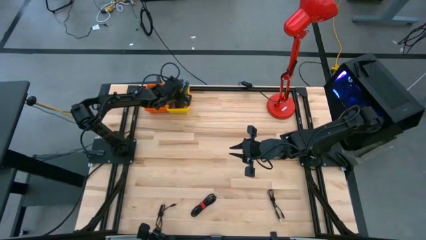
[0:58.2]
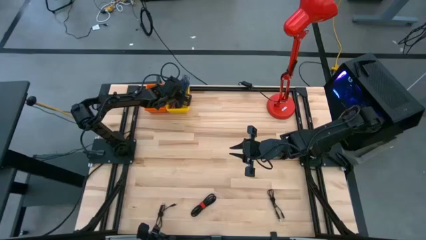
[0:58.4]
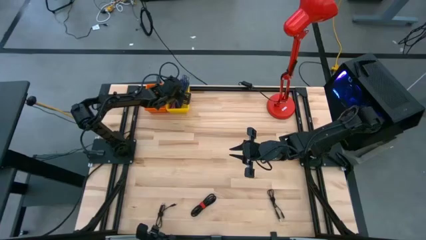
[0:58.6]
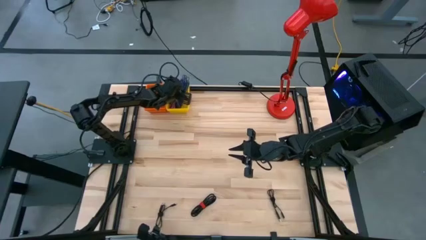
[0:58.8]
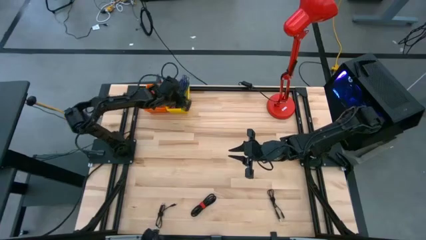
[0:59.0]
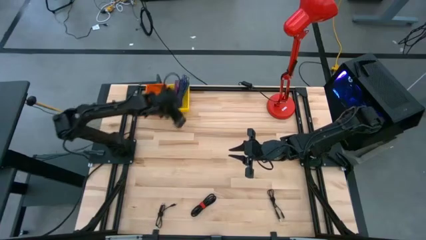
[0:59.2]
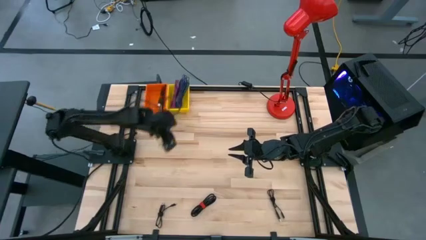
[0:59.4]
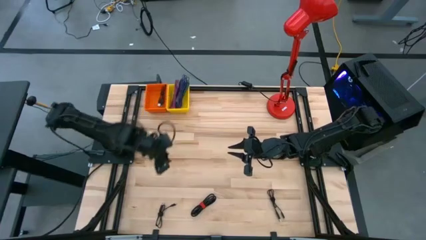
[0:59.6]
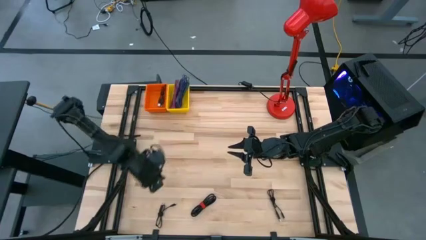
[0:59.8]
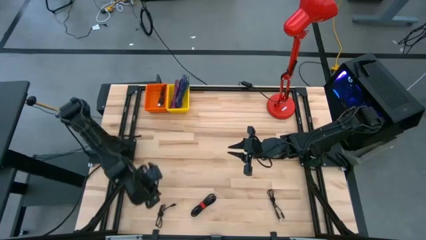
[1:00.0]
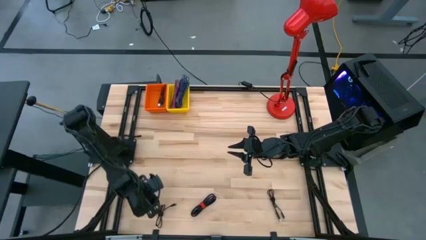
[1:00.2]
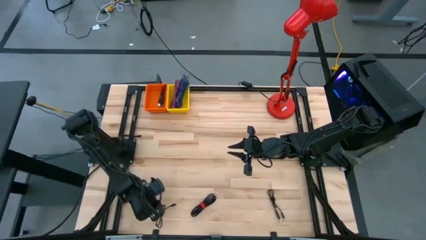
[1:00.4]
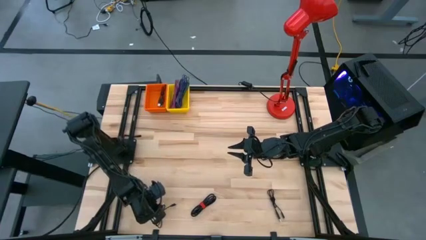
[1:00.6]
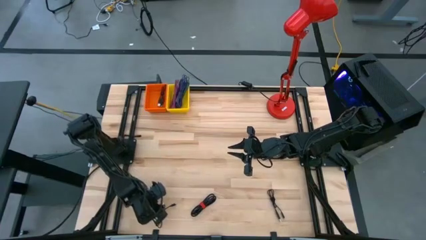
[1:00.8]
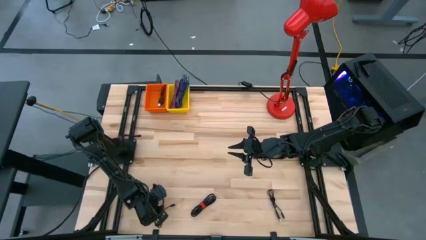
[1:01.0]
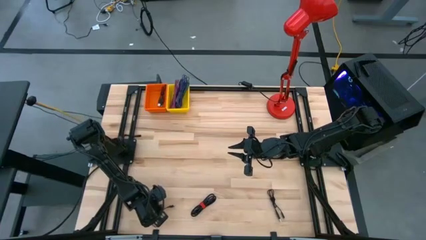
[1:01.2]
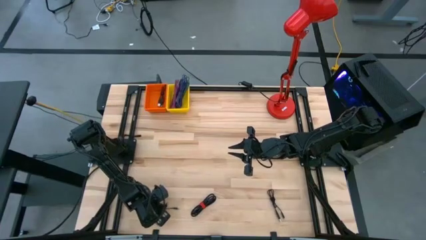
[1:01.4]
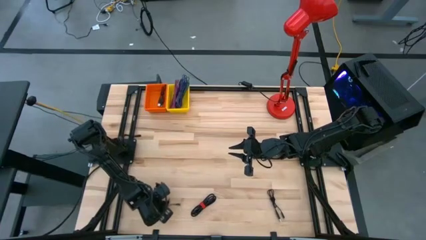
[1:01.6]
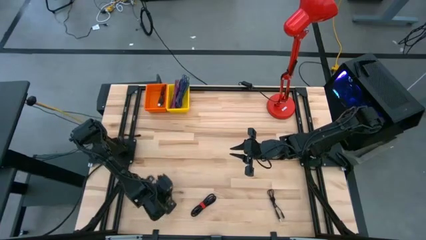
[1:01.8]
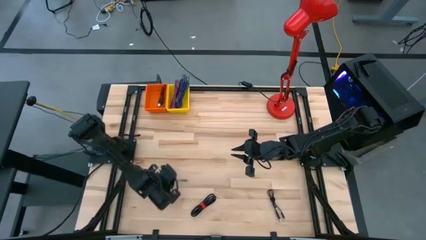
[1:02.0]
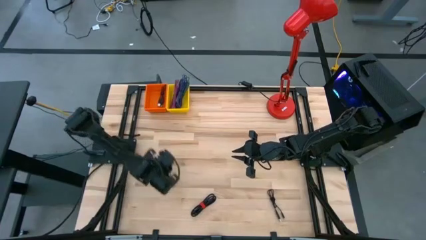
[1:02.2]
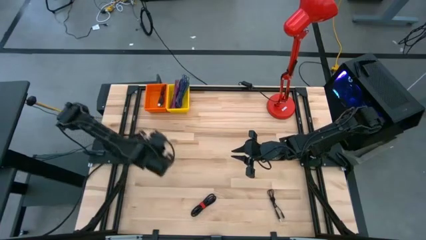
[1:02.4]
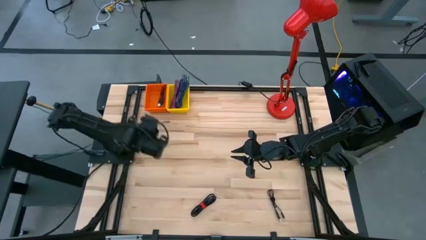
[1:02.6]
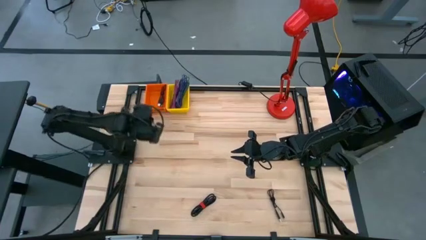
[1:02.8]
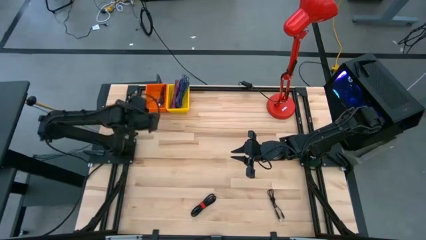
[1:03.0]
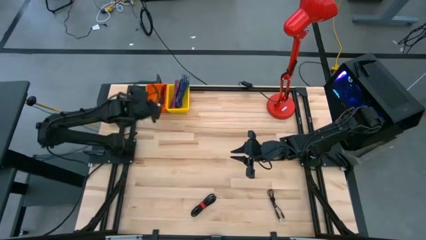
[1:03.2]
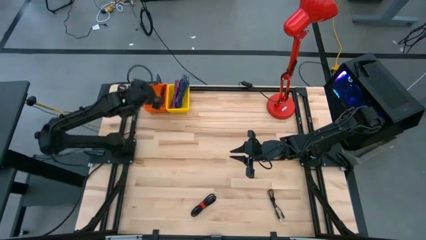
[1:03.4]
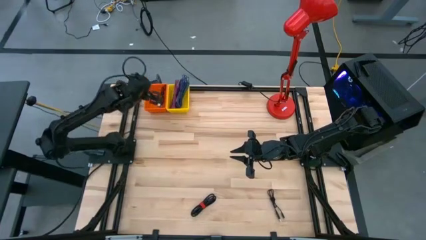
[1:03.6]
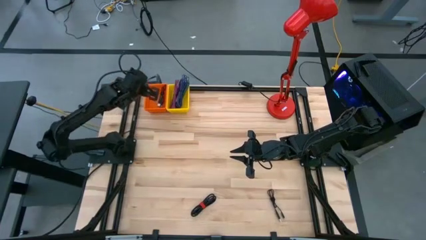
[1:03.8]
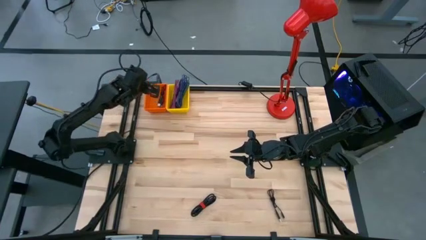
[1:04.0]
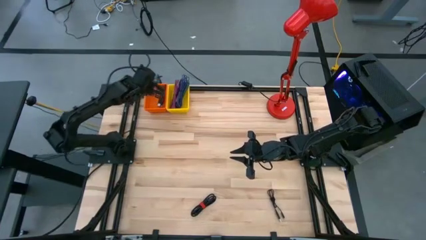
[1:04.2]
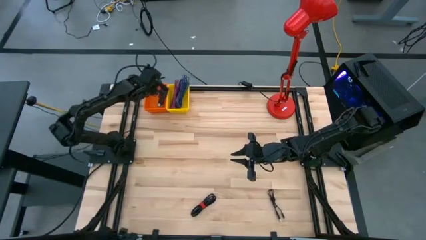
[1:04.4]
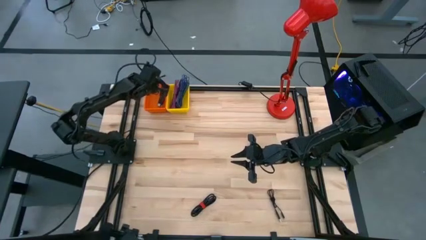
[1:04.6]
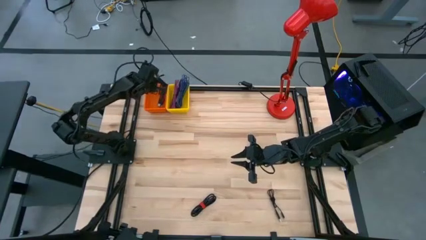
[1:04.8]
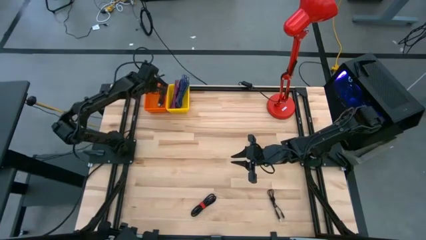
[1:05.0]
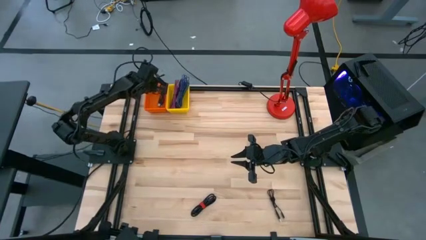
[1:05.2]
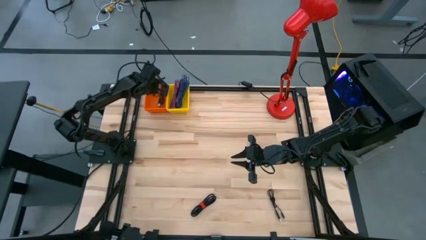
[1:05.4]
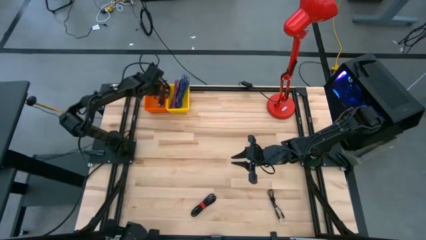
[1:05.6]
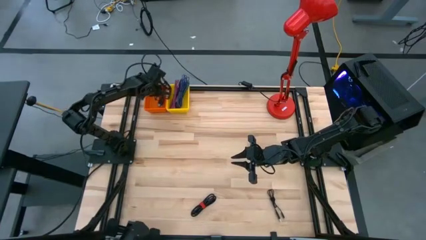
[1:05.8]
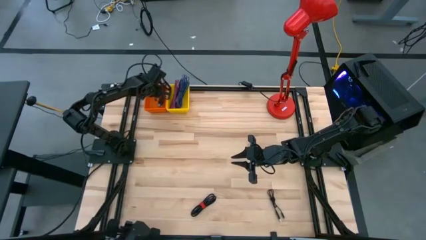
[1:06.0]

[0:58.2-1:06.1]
Task: Pick & Place USB Port
Put the black USB cable into the orange bin

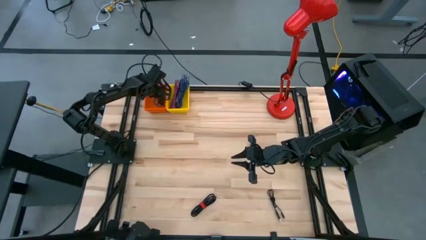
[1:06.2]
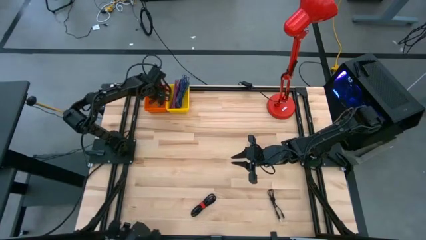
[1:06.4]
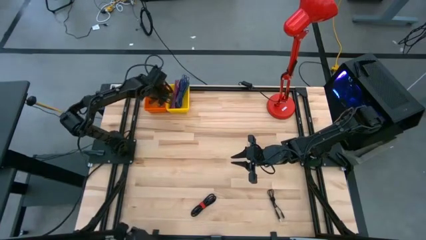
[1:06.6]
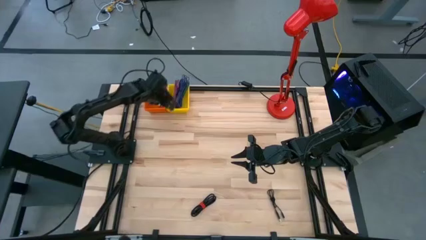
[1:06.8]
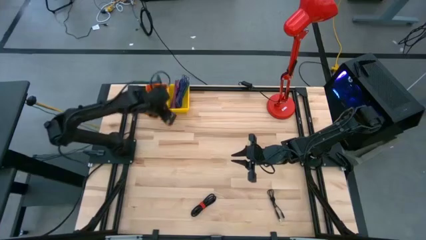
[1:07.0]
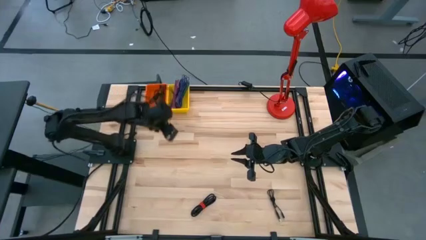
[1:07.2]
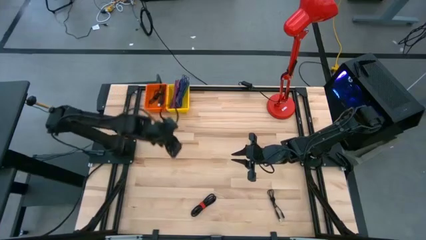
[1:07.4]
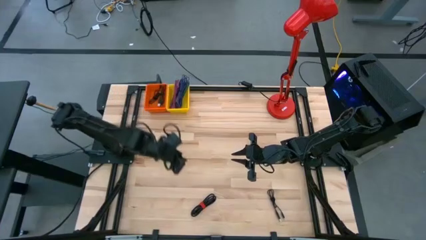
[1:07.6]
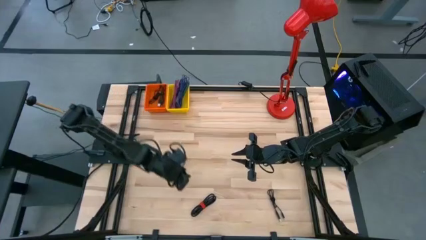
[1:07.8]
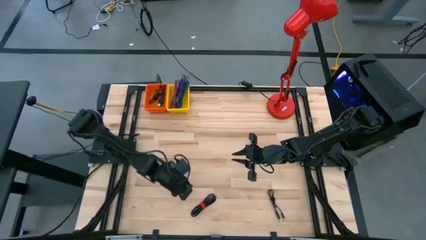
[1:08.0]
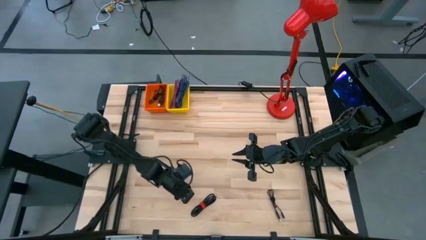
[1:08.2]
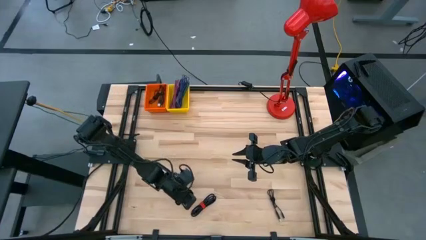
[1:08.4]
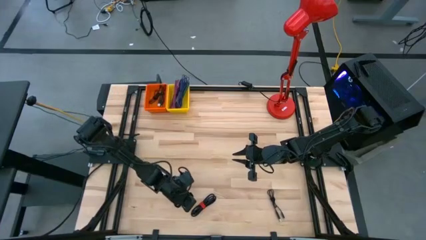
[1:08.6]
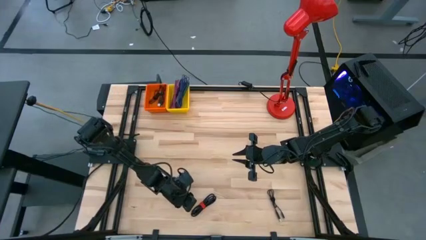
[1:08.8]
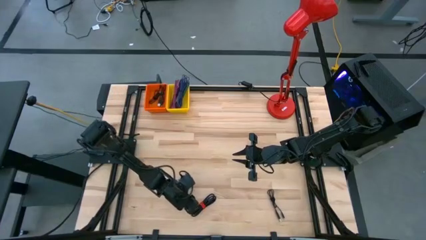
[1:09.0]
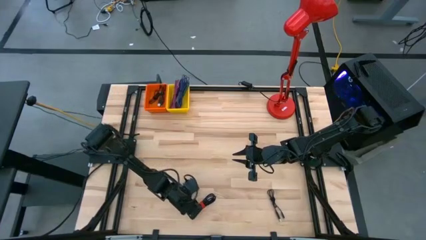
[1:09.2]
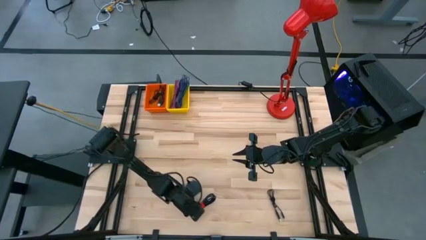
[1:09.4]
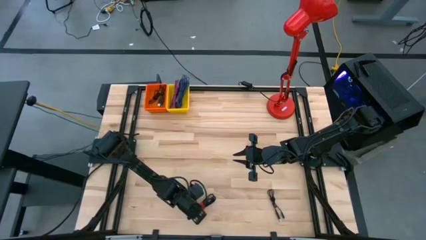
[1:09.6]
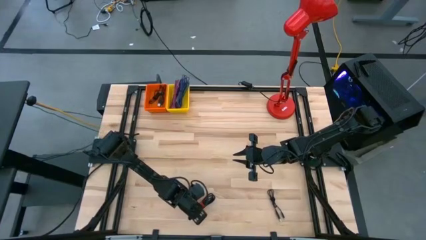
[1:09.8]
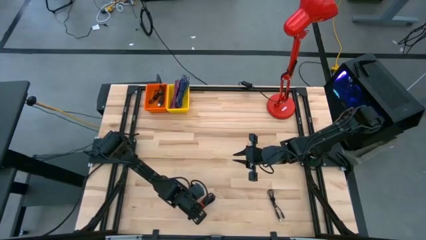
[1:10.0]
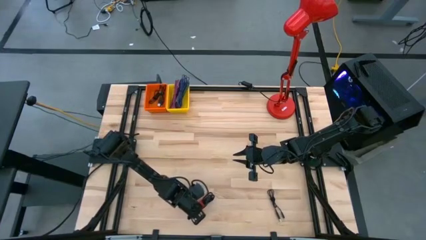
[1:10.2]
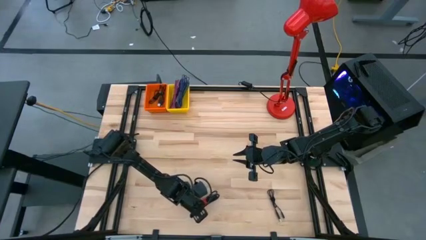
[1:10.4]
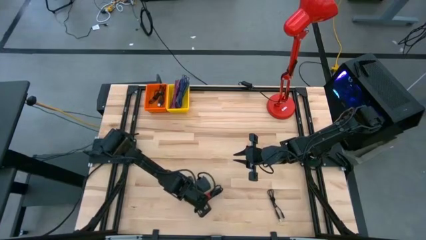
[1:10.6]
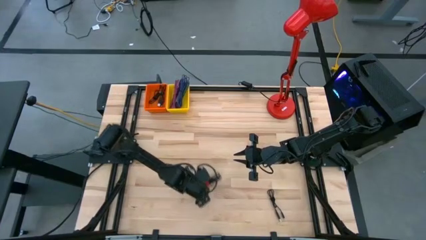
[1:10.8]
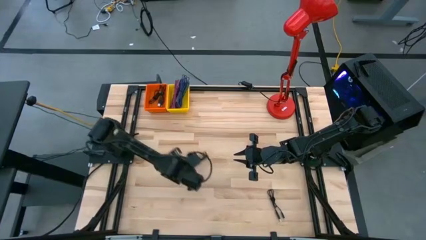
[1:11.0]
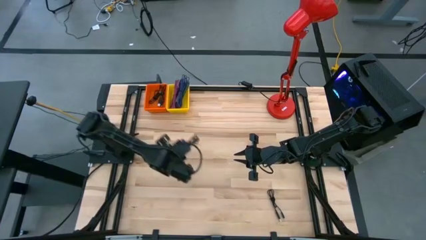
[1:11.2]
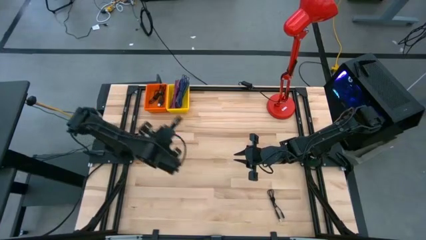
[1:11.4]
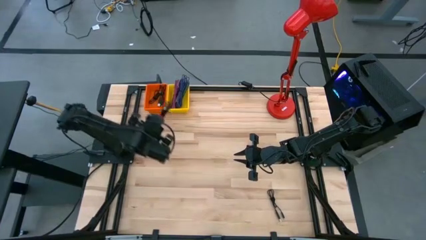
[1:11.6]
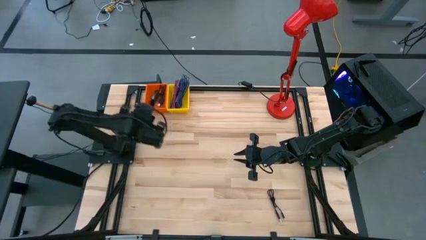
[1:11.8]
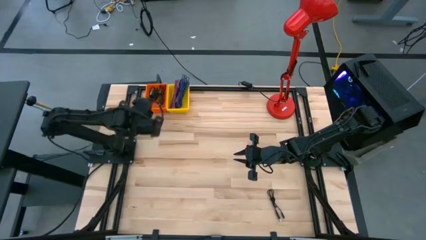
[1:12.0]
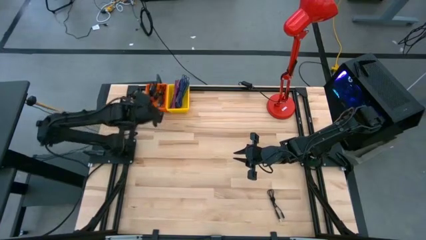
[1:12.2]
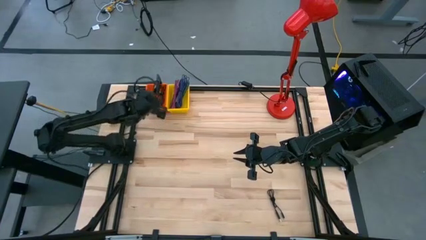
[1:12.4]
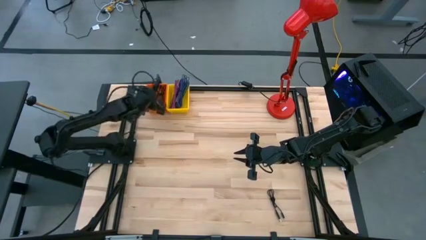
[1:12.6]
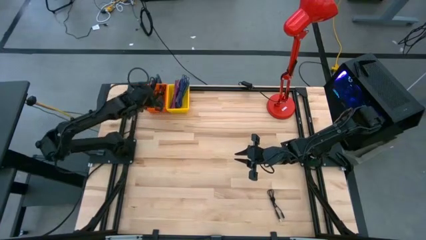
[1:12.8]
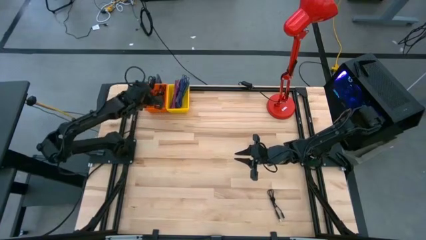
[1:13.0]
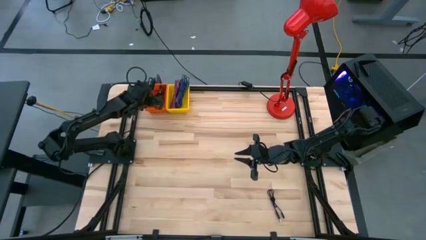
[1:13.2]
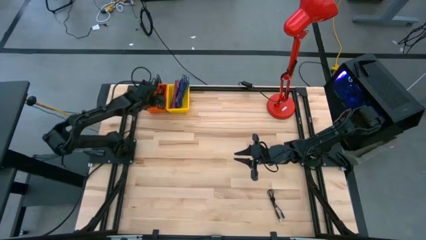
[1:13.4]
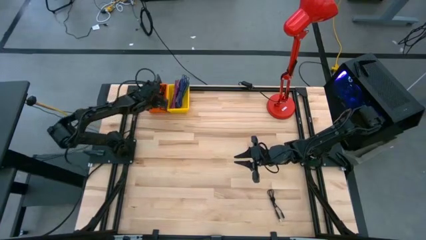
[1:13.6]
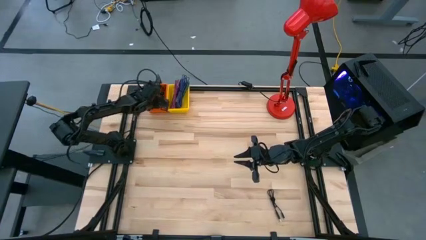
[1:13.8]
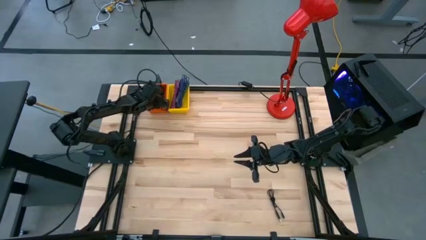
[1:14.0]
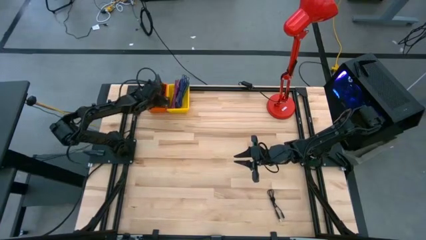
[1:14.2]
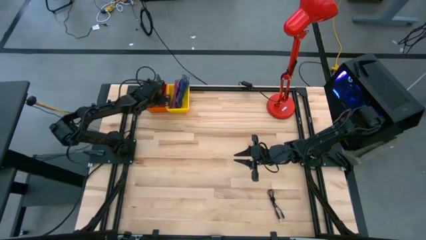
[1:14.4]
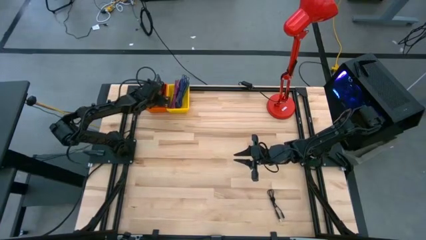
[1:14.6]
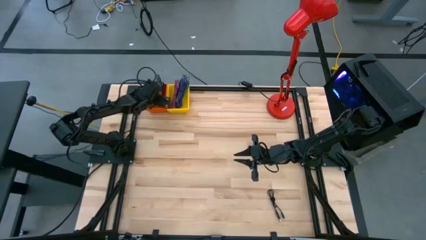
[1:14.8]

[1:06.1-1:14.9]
Put the black USB cable into the orange bin
